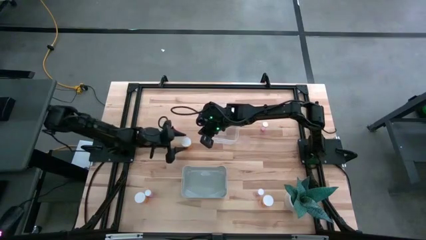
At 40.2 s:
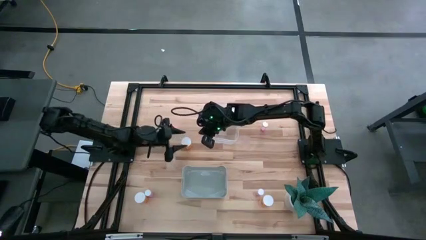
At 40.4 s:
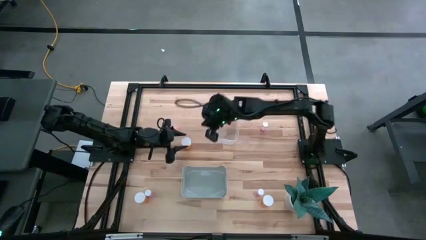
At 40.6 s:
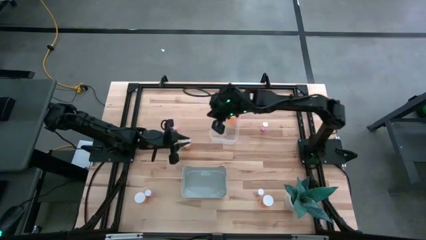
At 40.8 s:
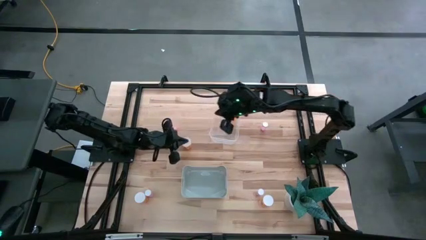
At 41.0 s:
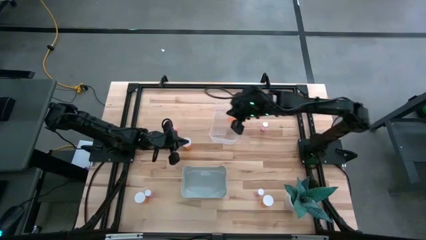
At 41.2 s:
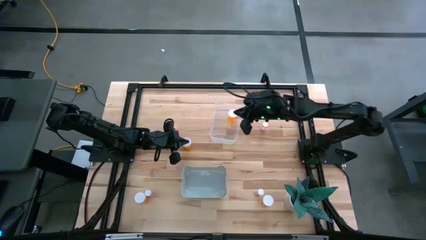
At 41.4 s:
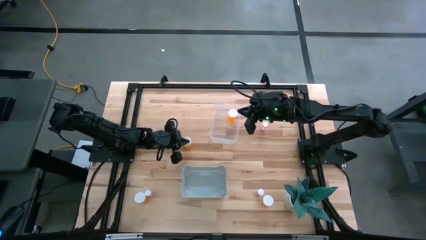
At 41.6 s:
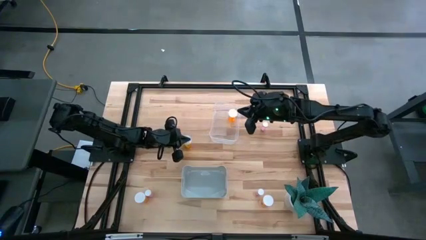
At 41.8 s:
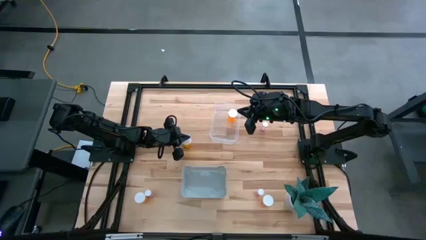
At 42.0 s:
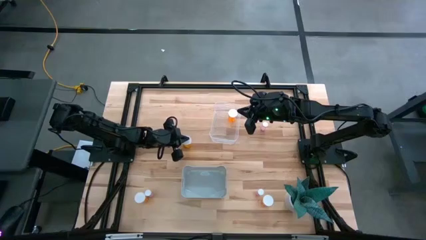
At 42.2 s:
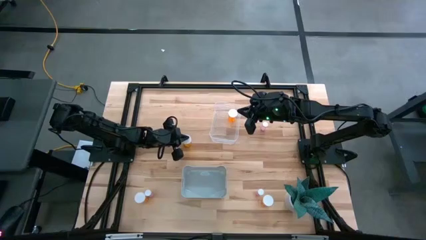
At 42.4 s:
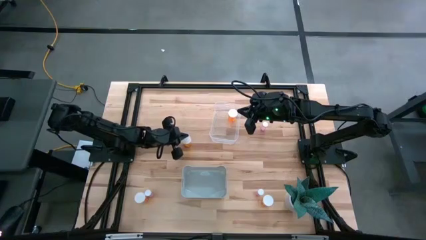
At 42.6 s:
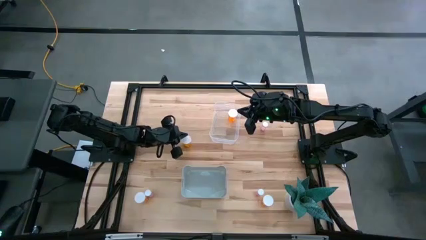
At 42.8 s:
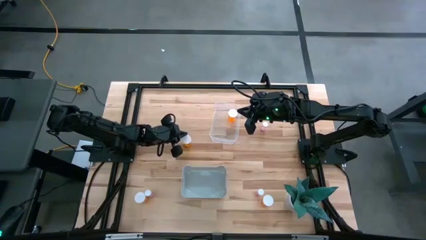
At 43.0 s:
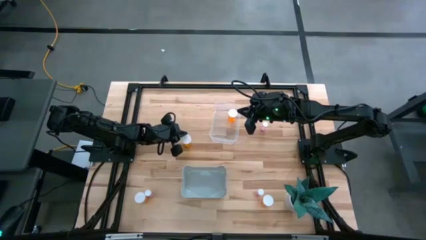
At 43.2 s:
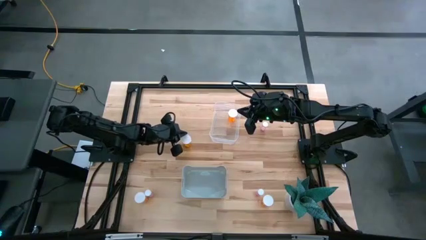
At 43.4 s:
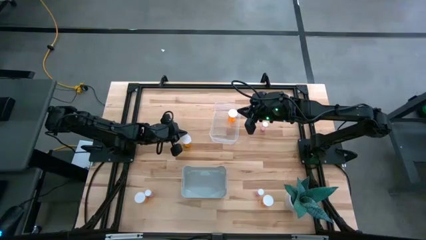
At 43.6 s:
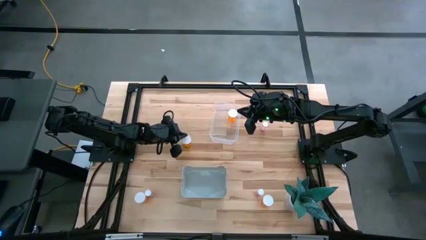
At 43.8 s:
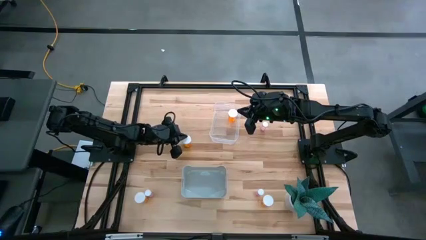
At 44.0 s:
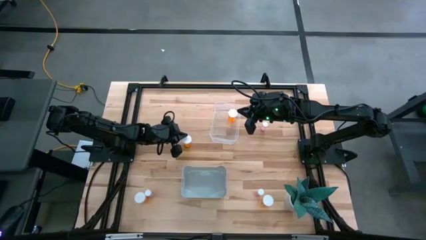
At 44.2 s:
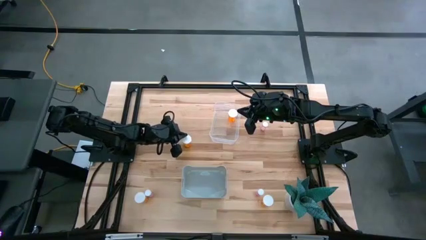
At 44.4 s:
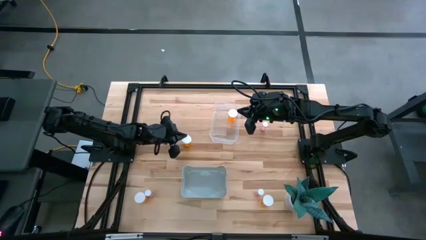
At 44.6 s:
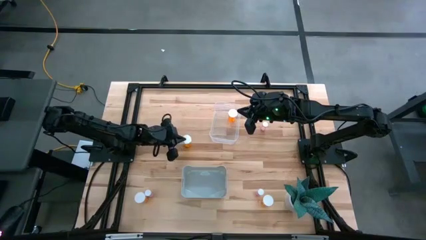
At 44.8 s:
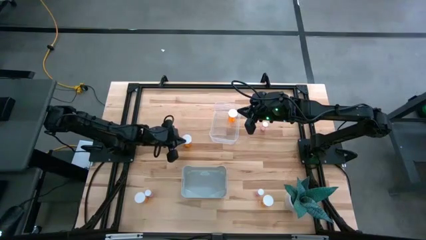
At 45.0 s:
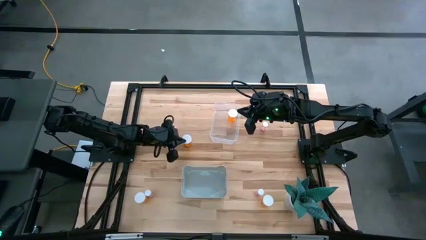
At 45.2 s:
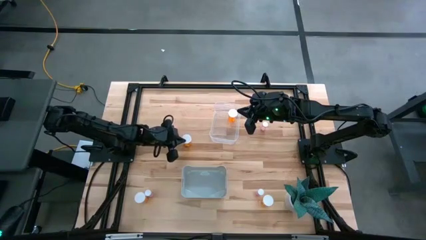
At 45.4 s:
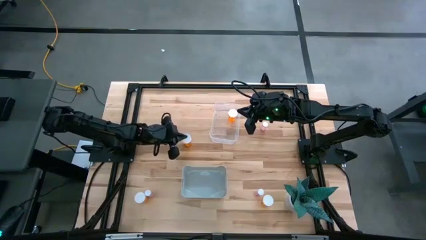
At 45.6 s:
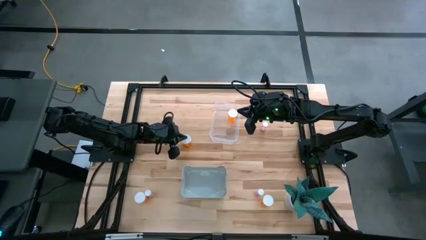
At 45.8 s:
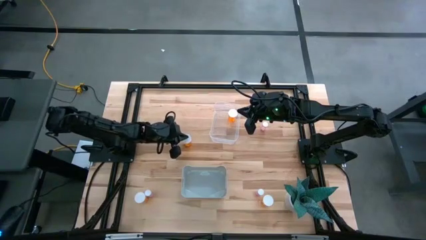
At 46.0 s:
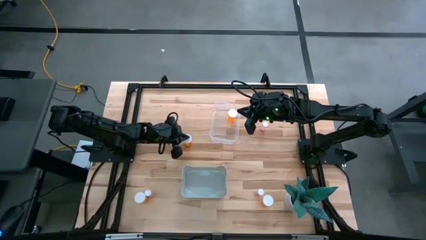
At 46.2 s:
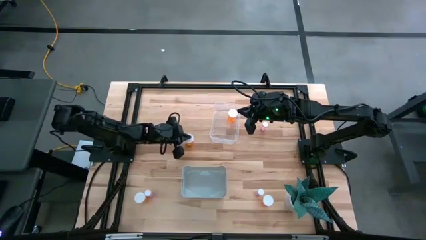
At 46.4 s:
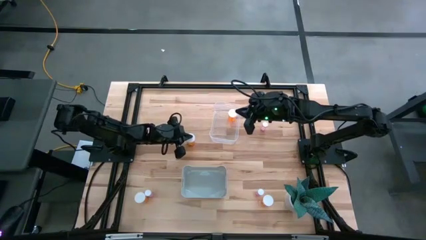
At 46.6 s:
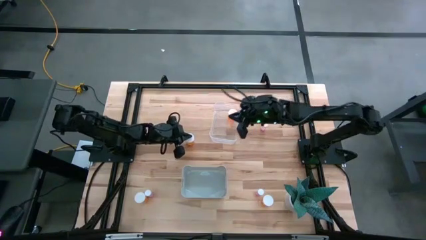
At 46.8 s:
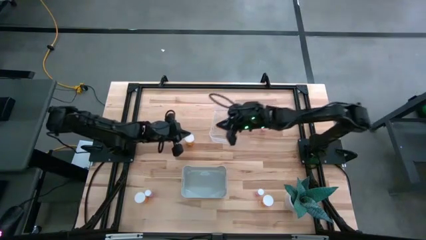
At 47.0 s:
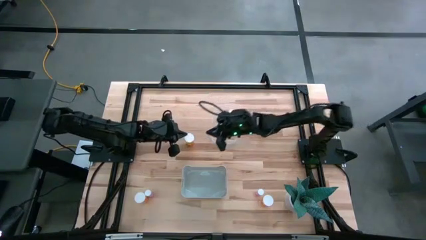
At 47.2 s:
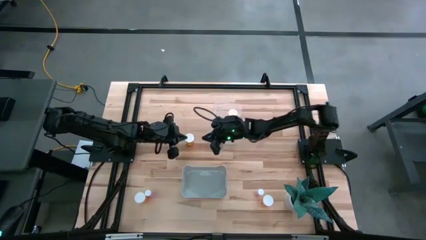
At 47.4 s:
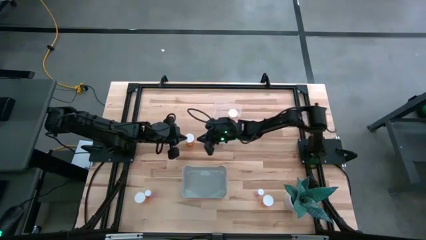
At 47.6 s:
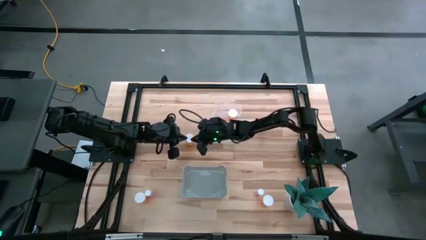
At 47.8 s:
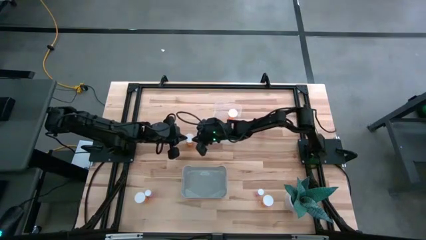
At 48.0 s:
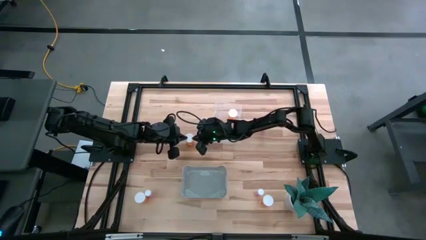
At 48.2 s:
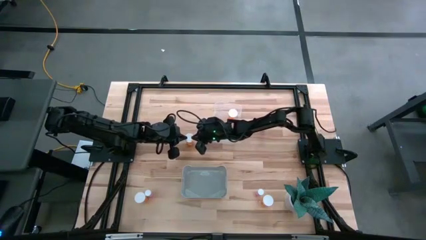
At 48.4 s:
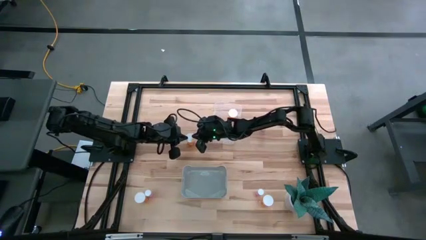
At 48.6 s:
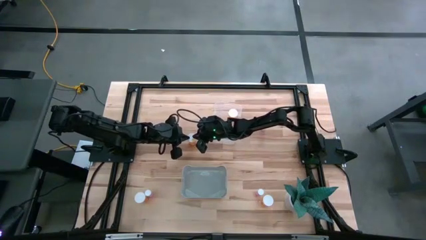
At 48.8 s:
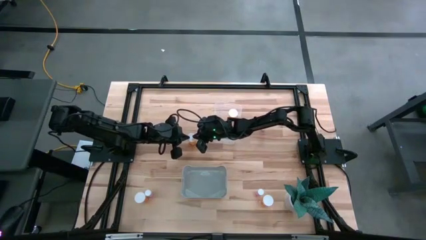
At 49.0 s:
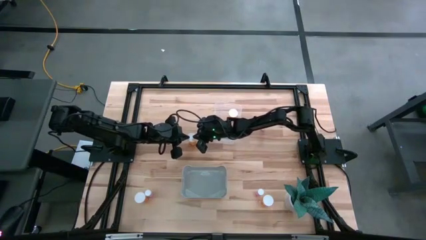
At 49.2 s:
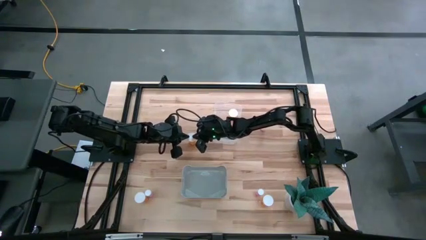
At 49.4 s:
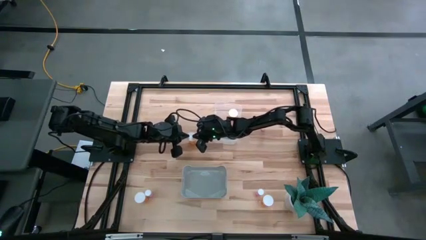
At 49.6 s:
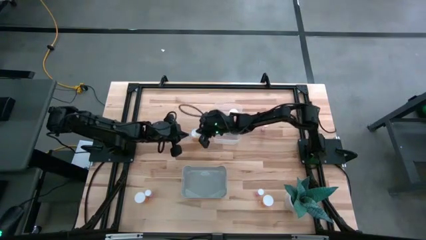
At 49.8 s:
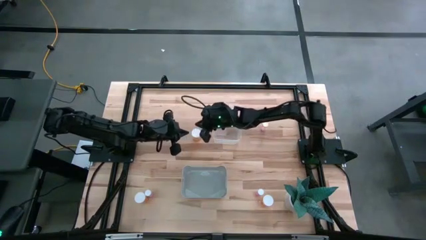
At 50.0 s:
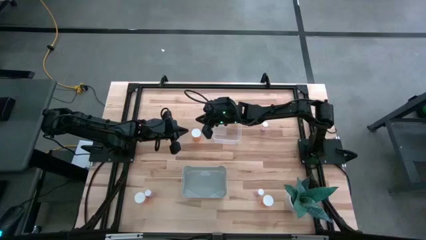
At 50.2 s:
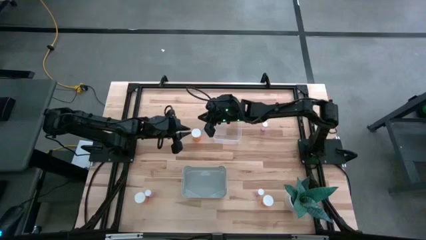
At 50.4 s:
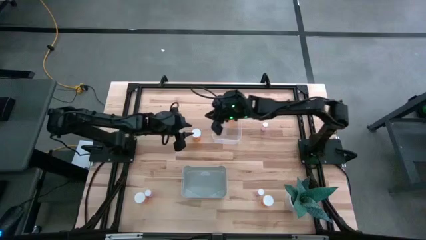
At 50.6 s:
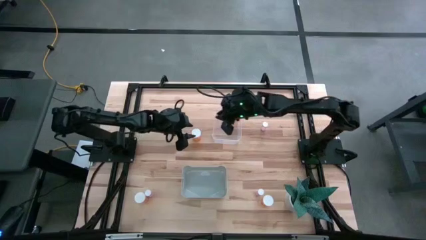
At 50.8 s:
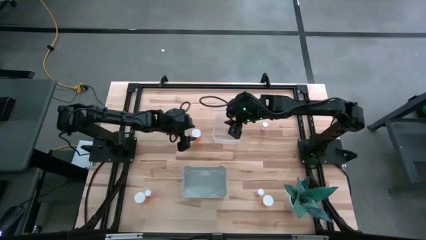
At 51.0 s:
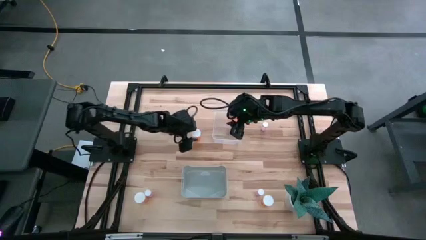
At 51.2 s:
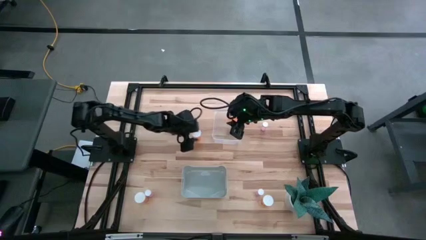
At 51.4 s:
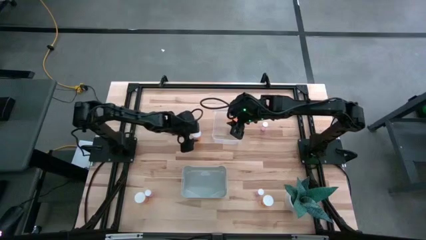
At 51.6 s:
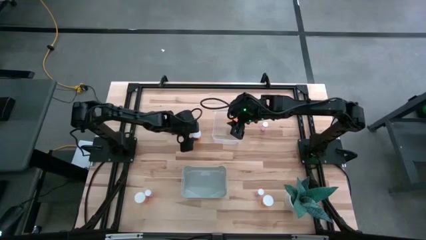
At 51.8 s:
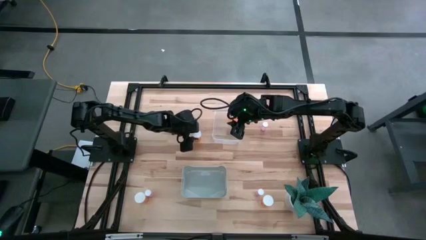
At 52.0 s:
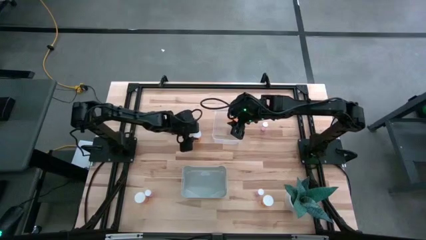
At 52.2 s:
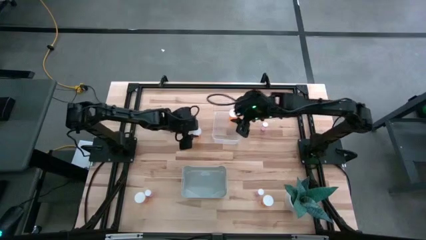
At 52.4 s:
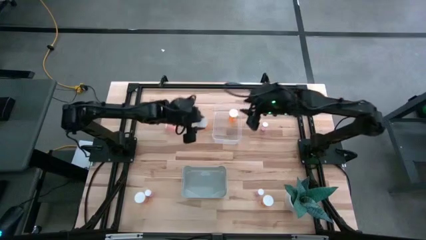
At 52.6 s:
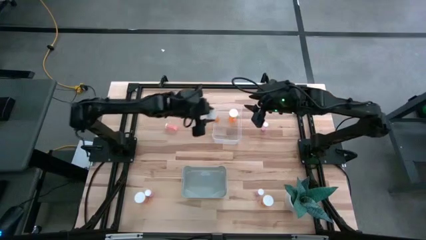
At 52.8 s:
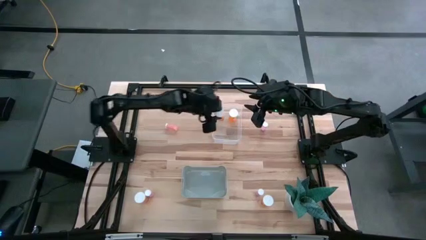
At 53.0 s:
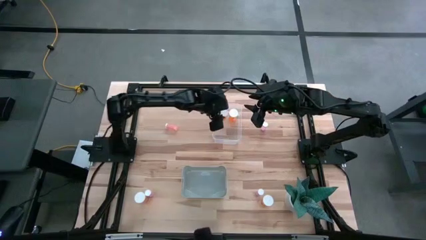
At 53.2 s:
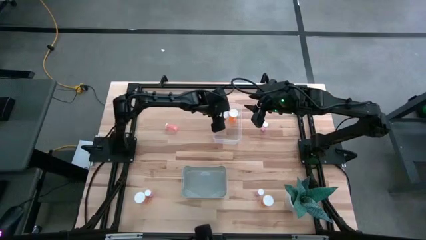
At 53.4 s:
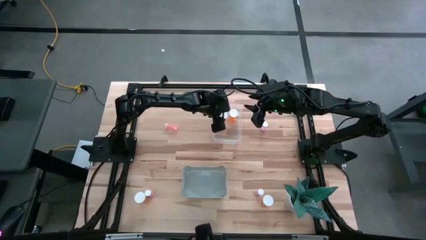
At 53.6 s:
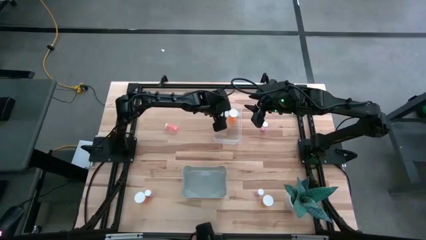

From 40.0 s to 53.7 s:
Task: Pick and place medicine bottles into bin by pill shape (circle, oval)
Put the top left orange pill bottle into the transparent bin
